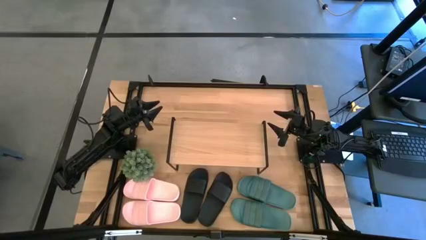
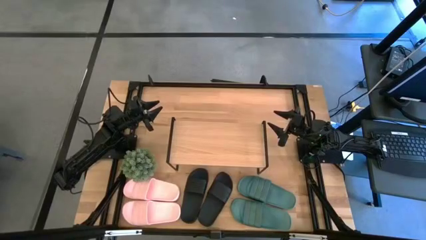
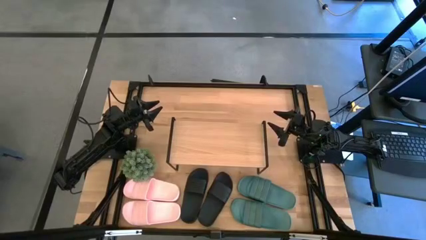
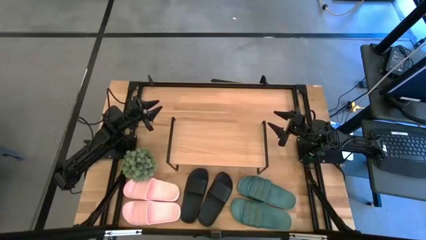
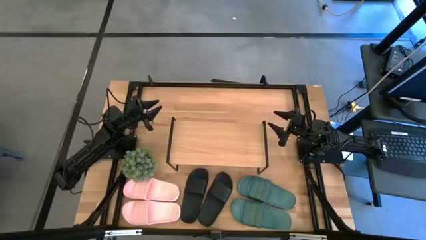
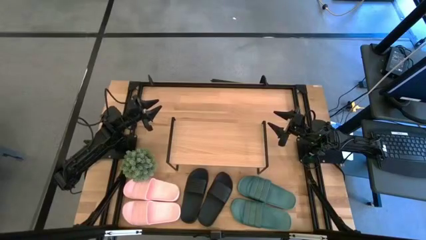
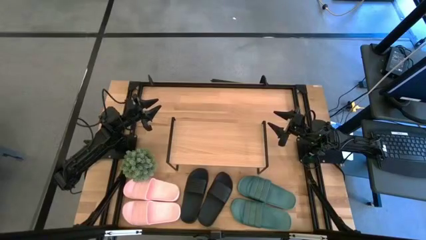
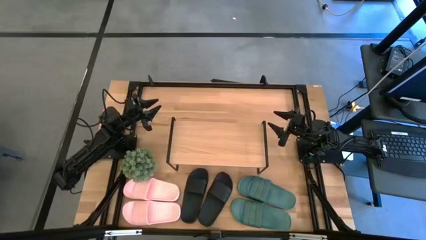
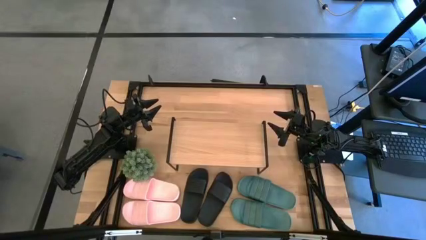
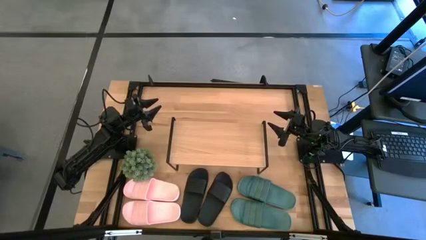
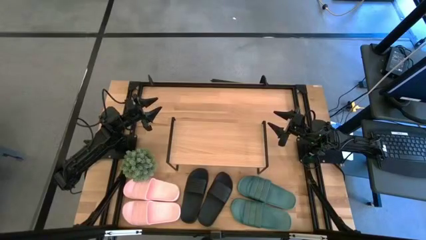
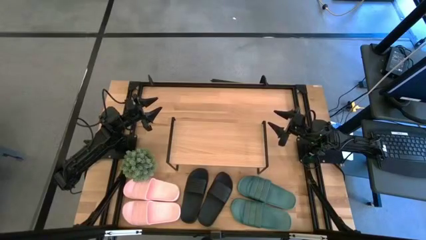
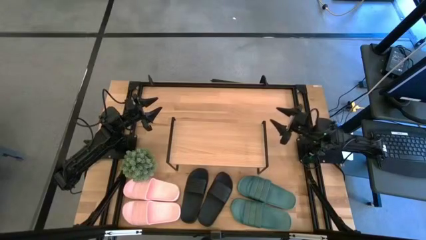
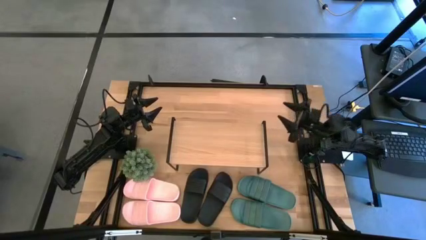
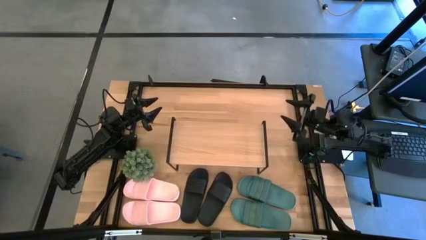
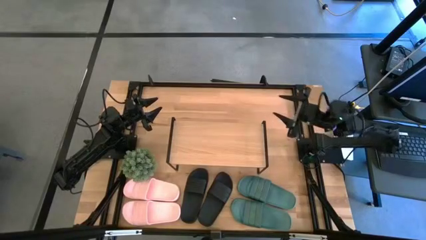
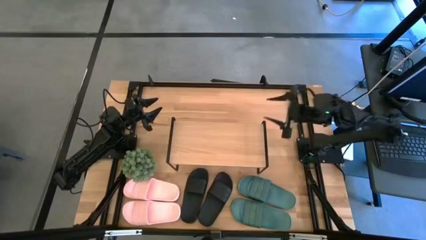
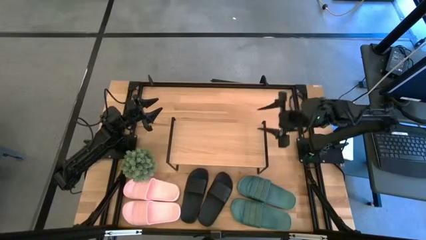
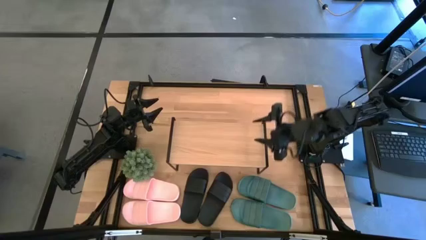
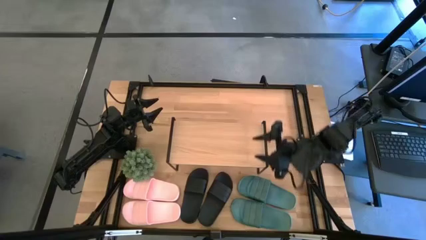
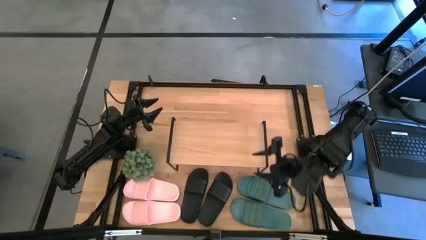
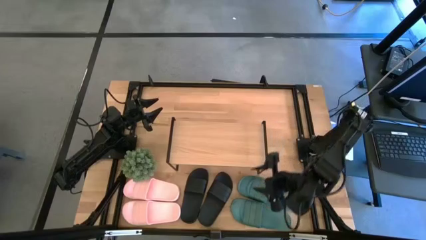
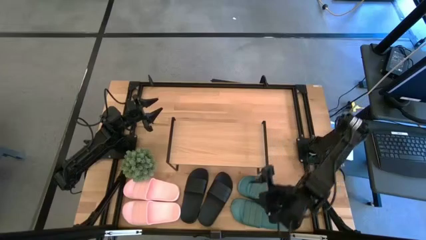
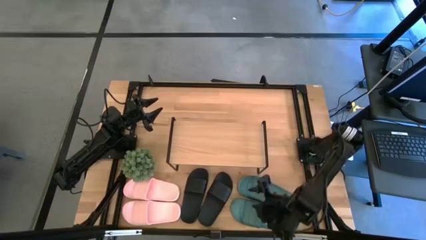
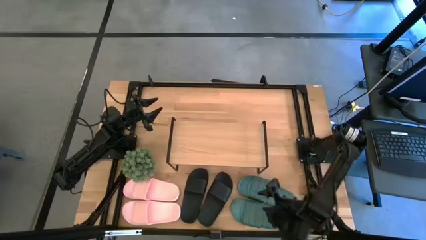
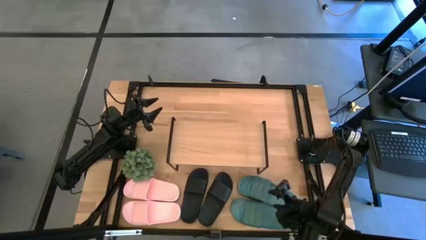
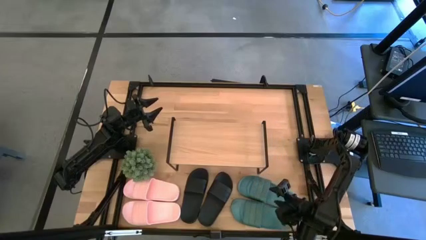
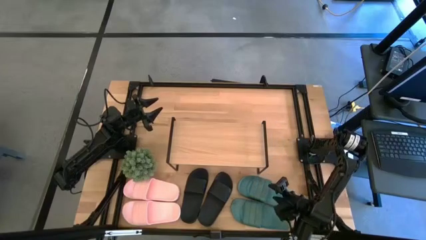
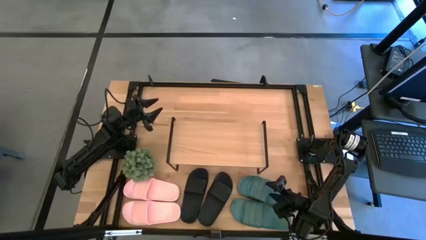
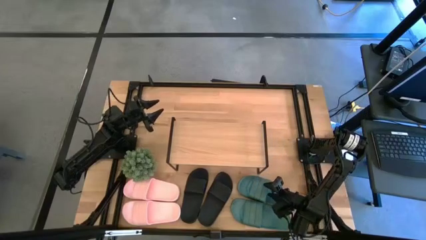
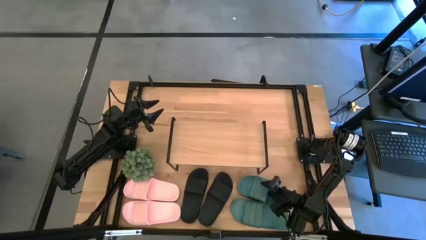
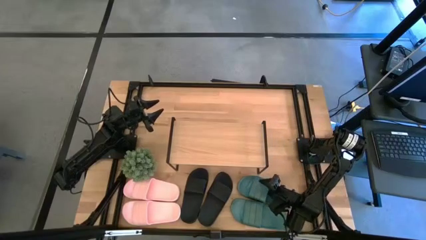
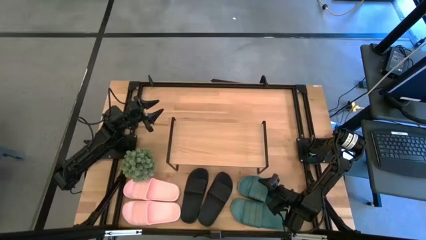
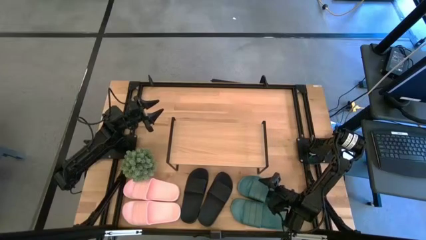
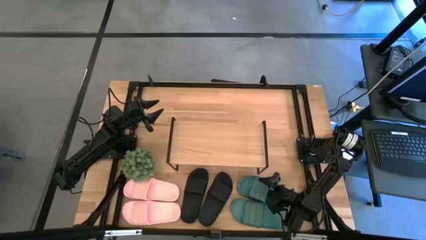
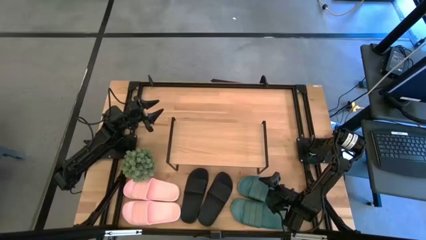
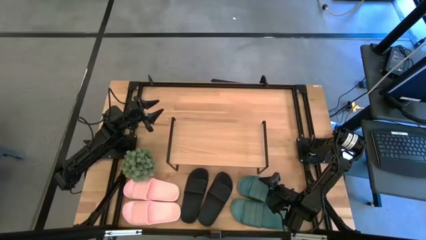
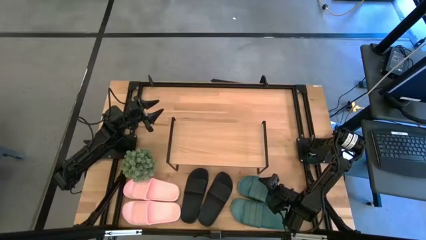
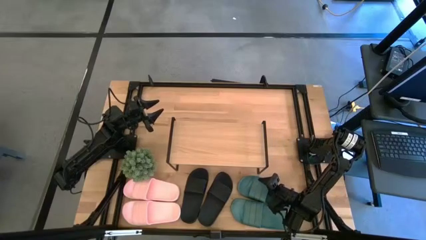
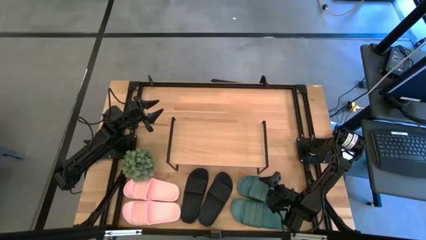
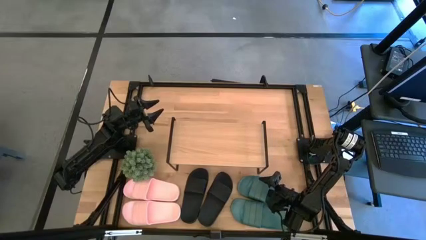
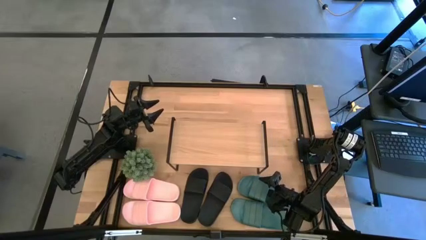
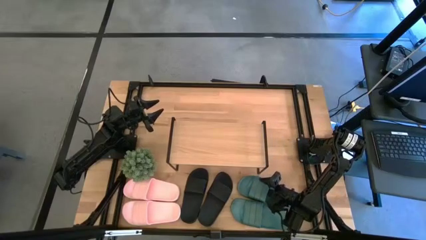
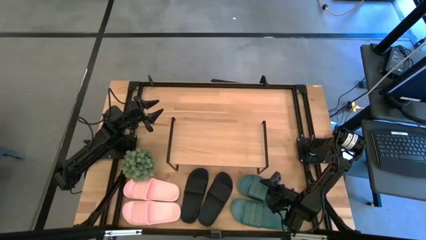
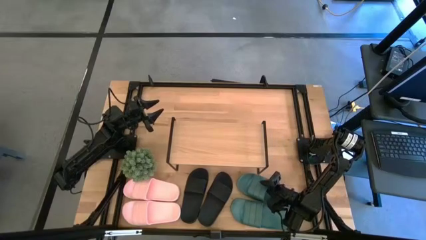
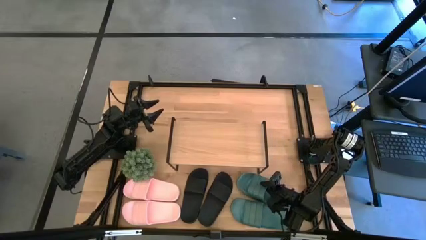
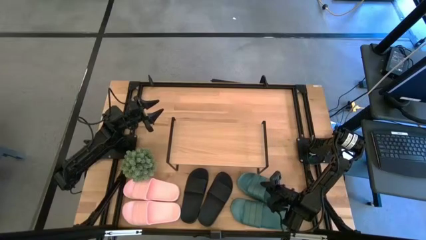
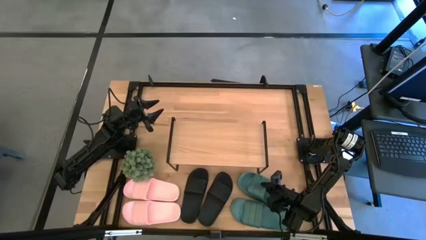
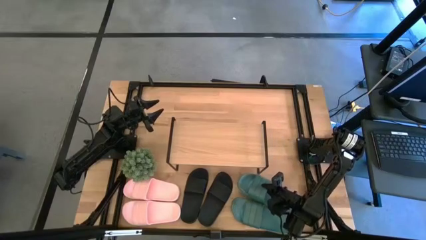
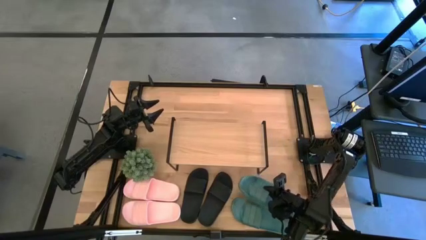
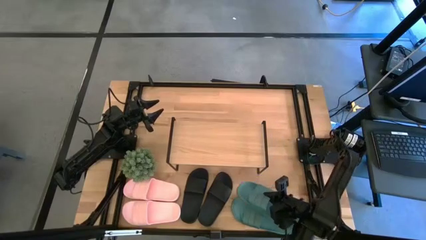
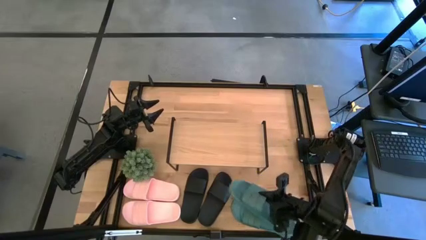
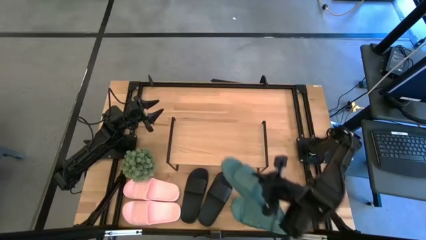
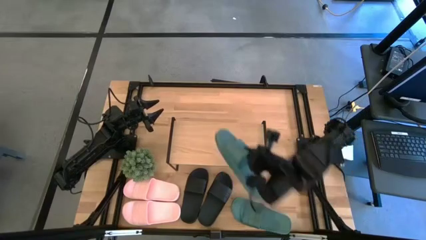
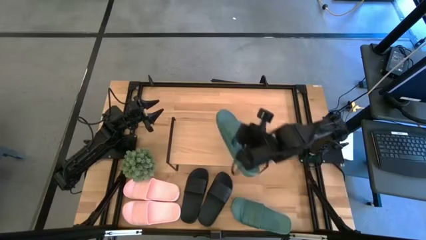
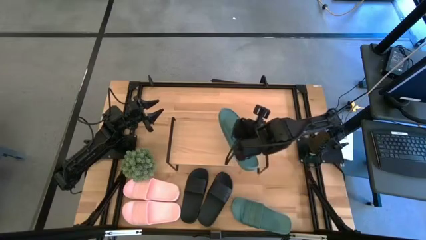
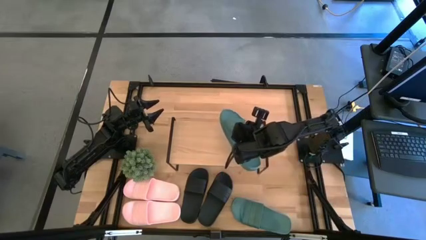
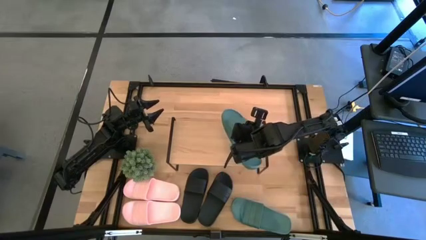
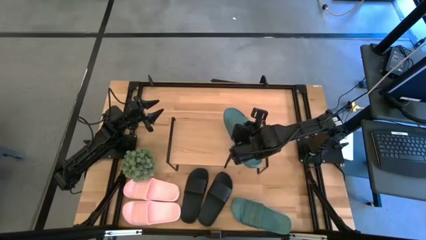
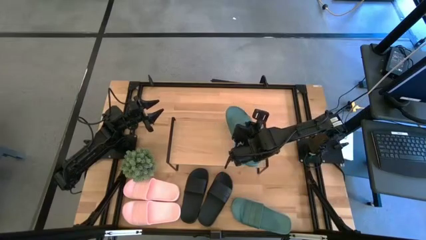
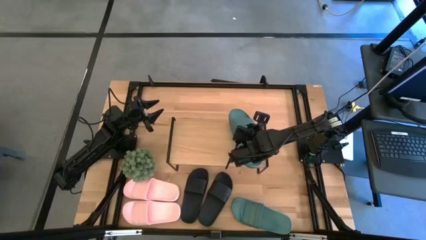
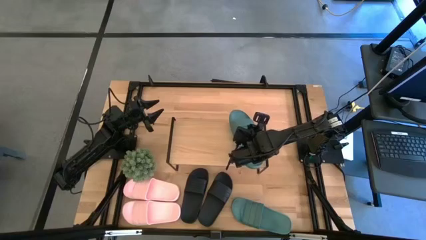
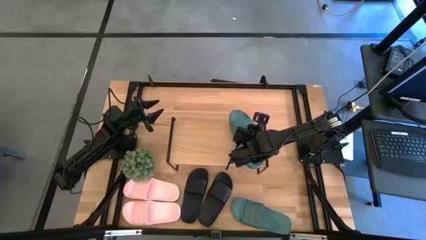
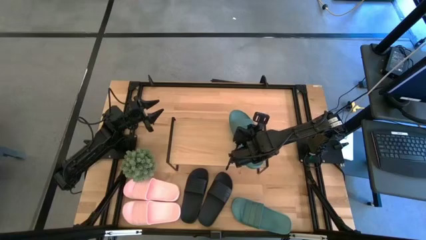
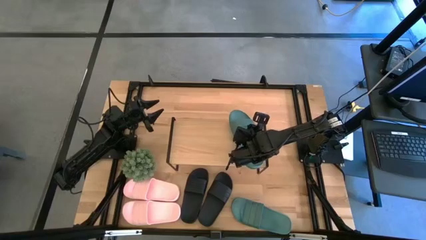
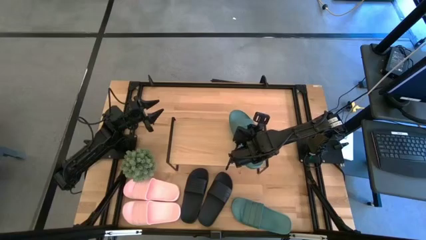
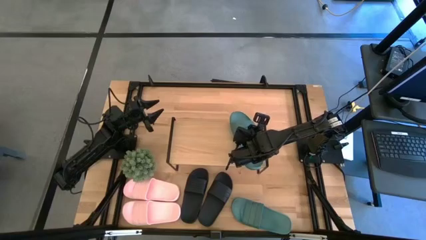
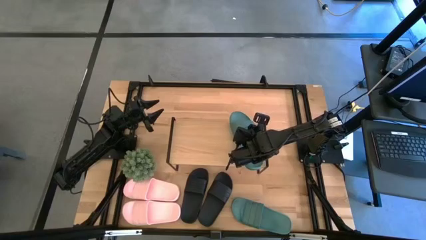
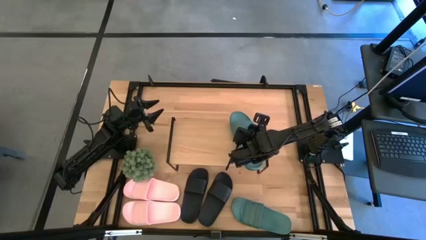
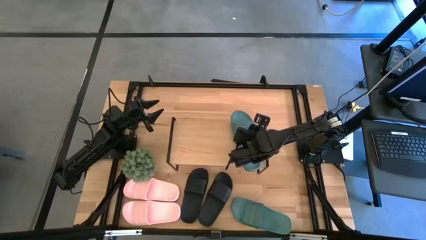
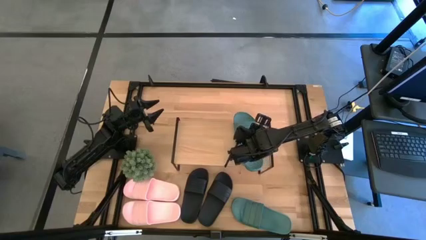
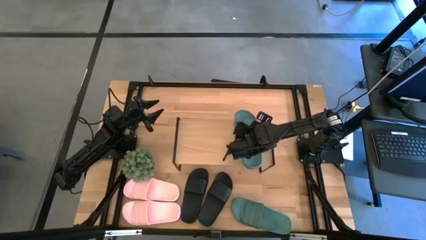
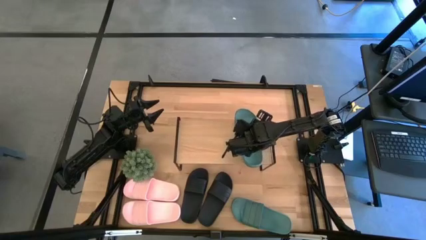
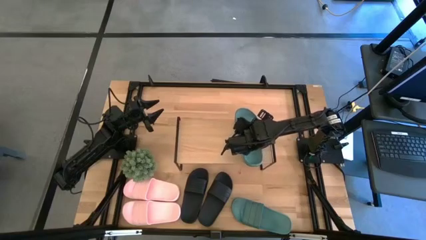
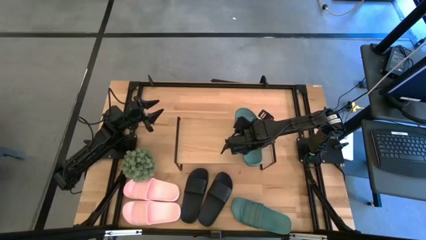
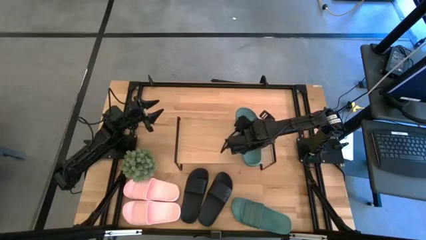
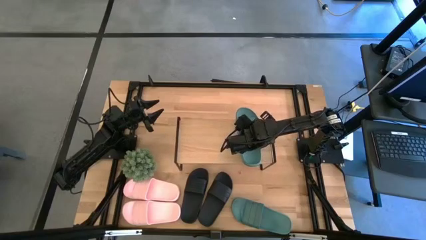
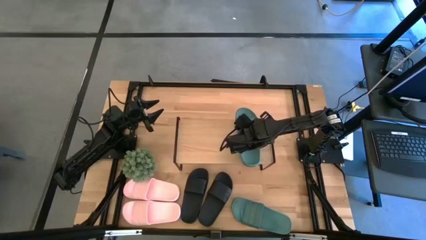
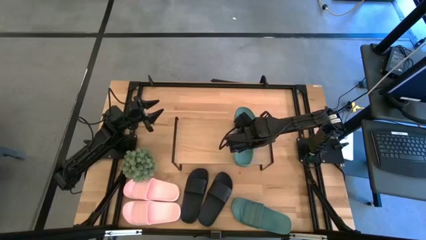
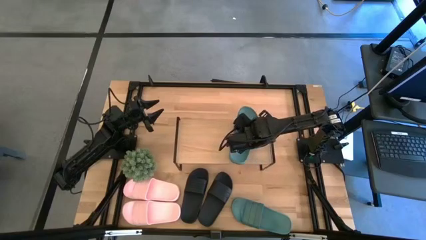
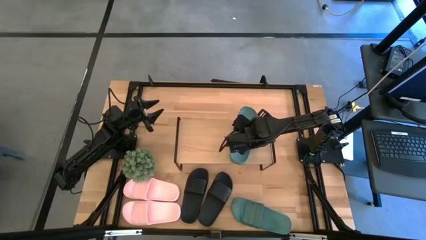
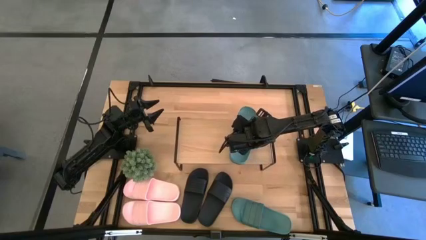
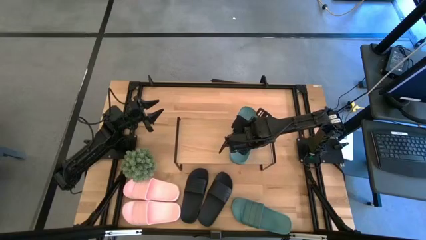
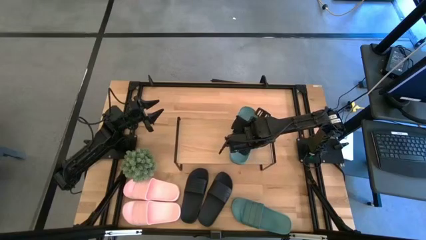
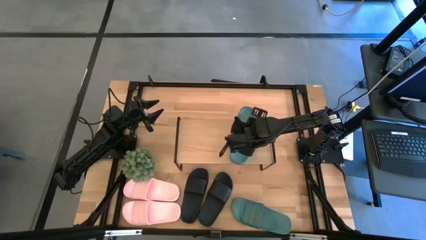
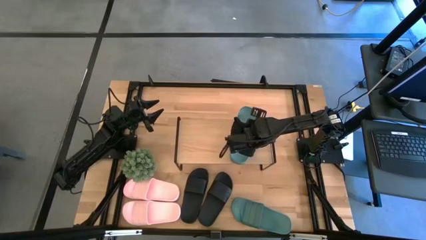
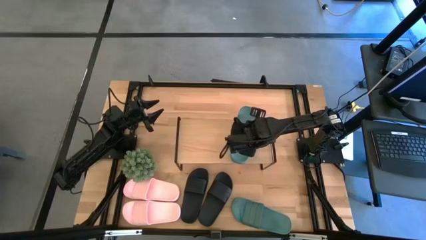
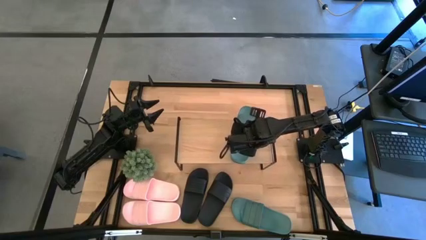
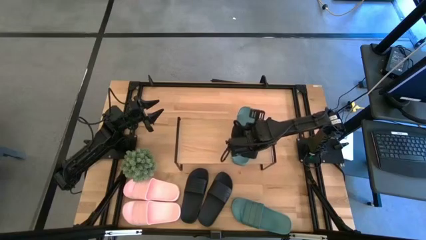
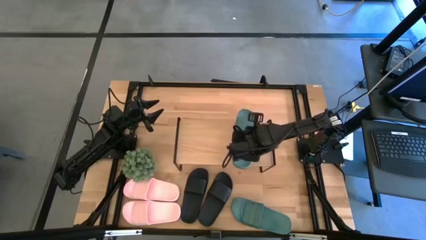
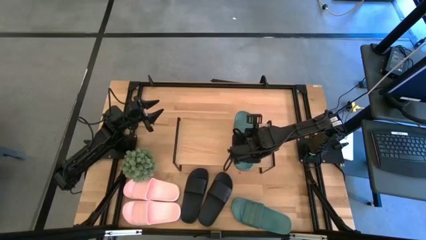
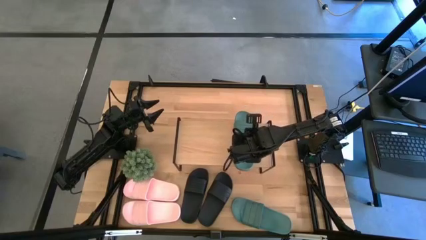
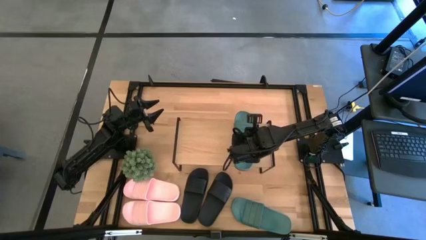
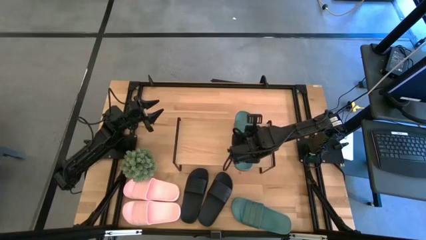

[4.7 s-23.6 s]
Task: Pick and place slides into the shelf
Put the right green slipper on the shelf
